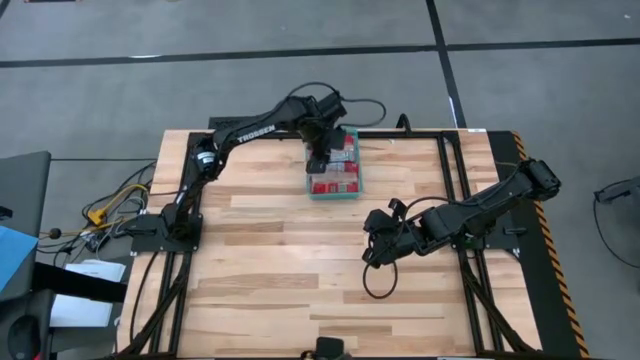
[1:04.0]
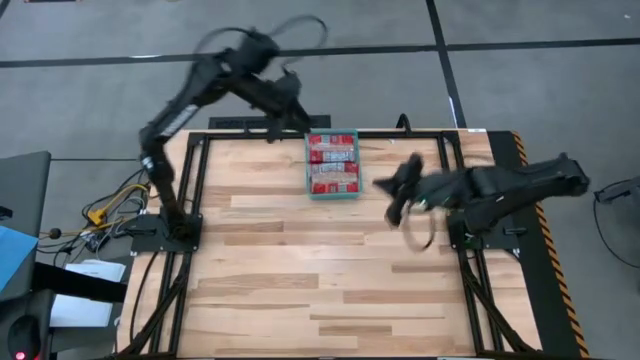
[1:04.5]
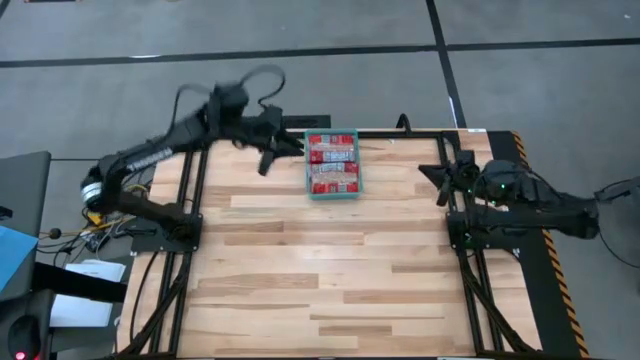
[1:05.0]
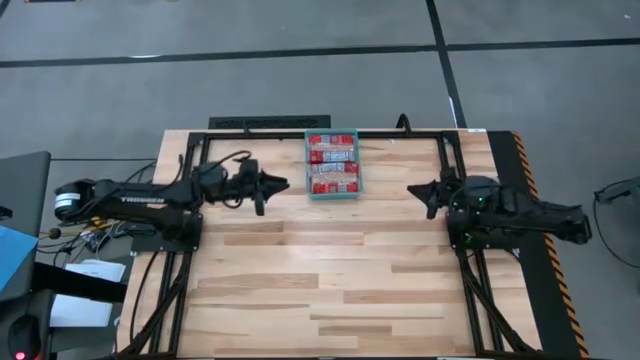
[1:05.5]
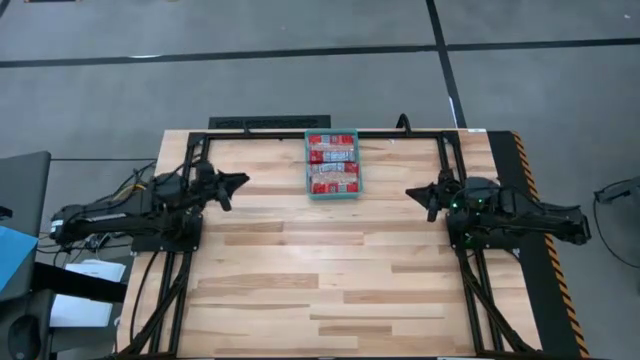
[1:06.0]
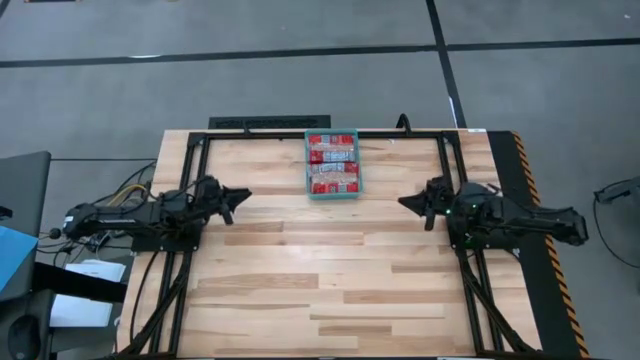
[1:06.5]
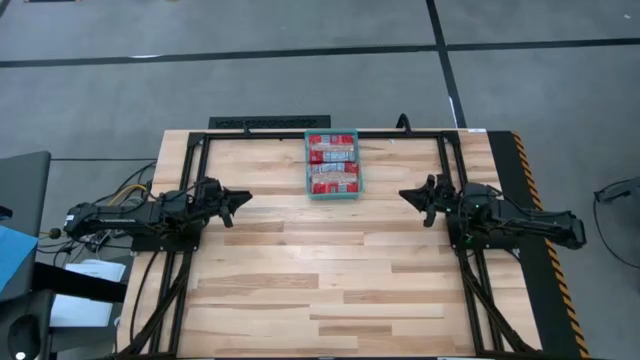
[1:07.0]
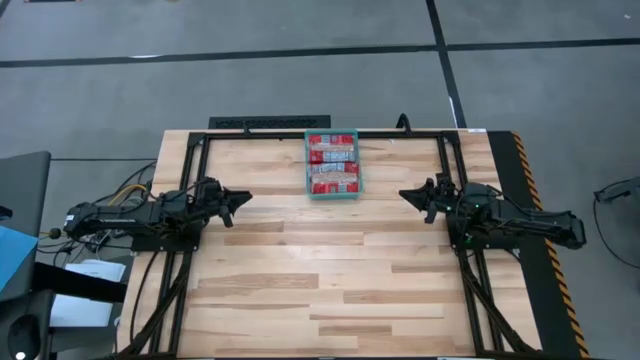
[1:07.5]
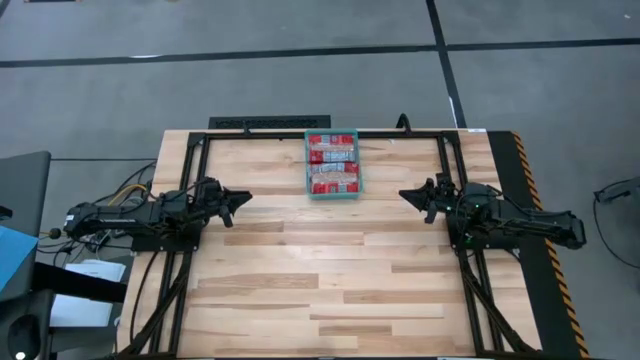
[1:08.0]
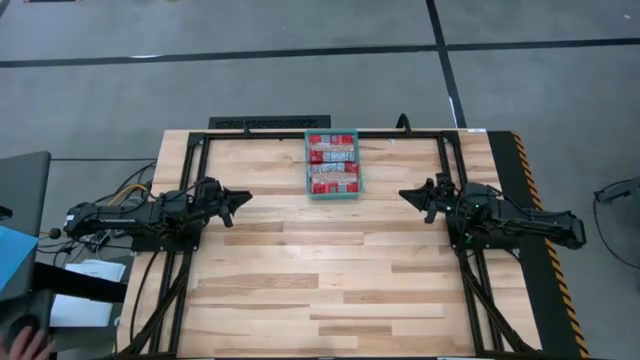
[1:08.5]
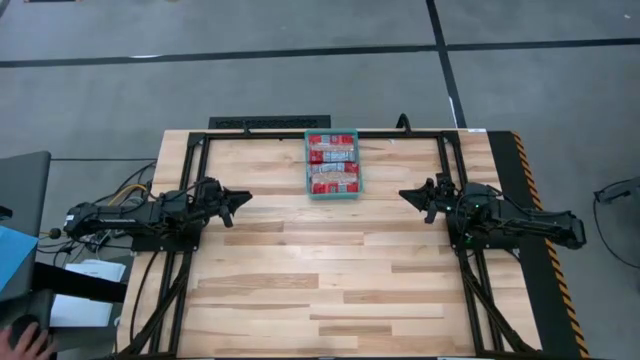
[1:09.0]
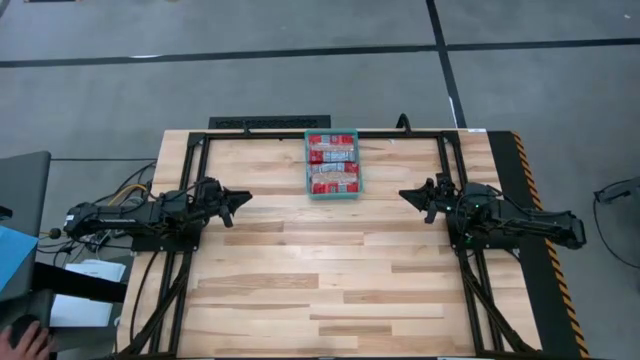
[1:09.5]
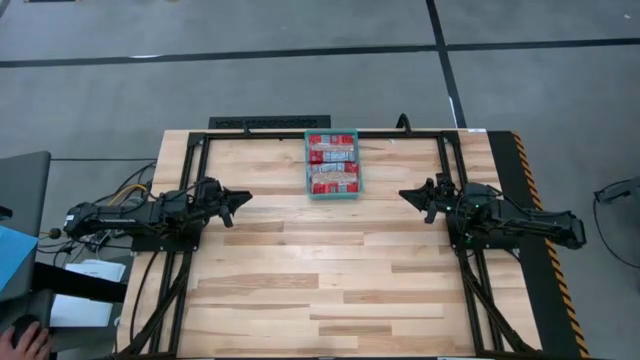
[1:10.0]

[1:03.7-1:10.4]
Task: Sort popcorn bags into baskets
Return to Home Position

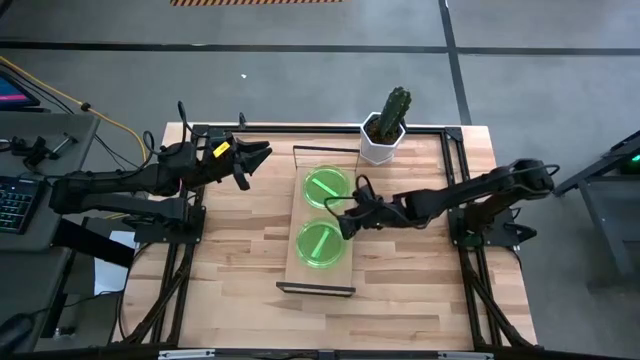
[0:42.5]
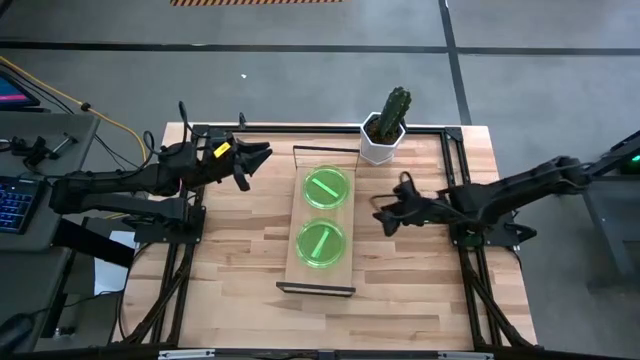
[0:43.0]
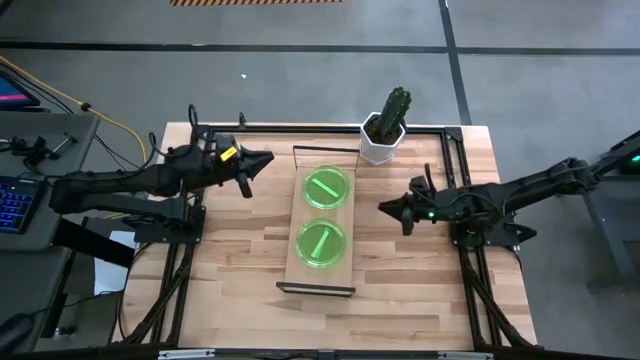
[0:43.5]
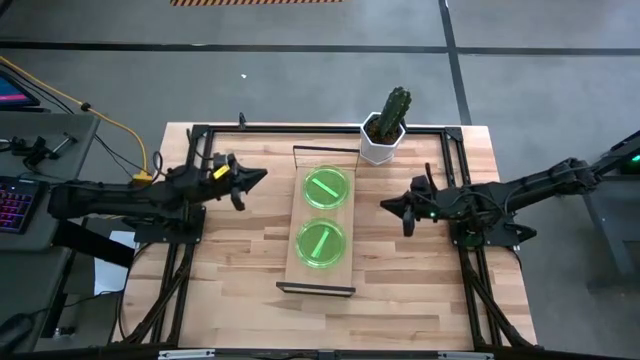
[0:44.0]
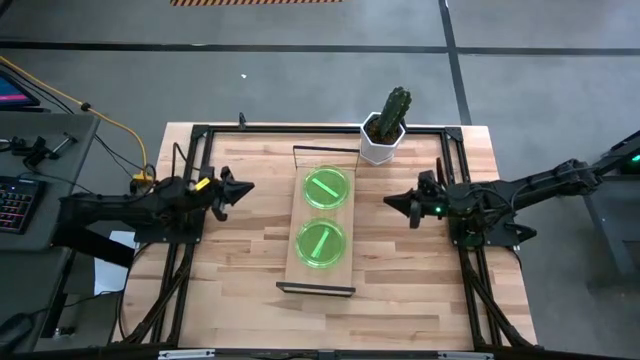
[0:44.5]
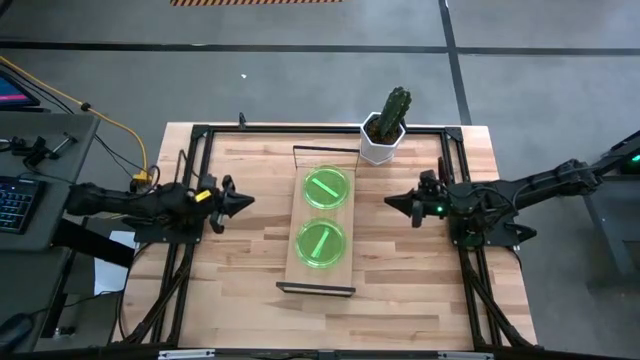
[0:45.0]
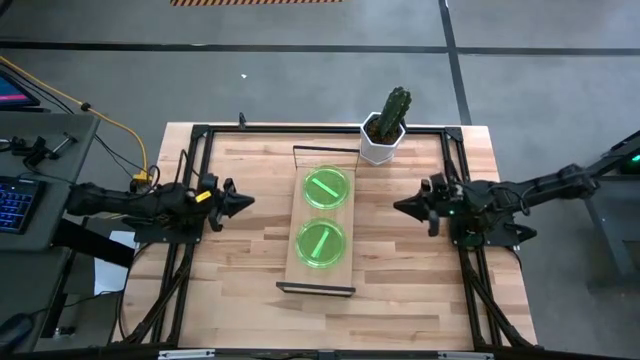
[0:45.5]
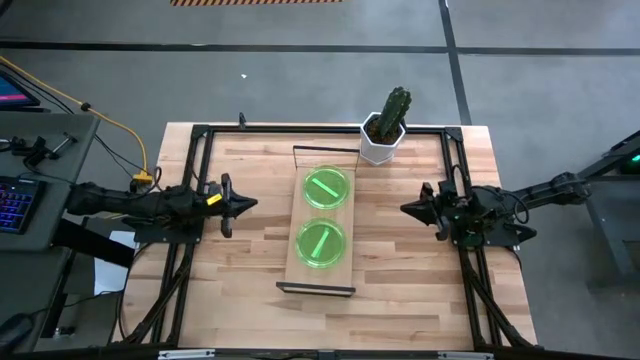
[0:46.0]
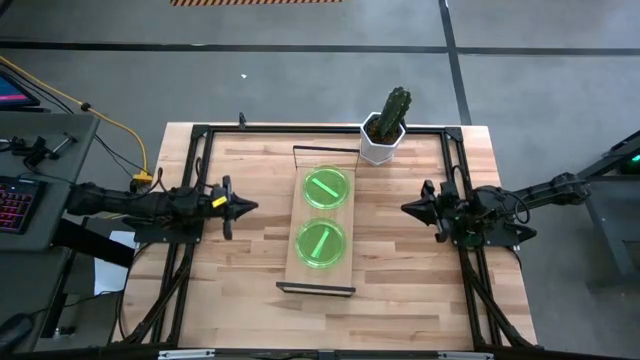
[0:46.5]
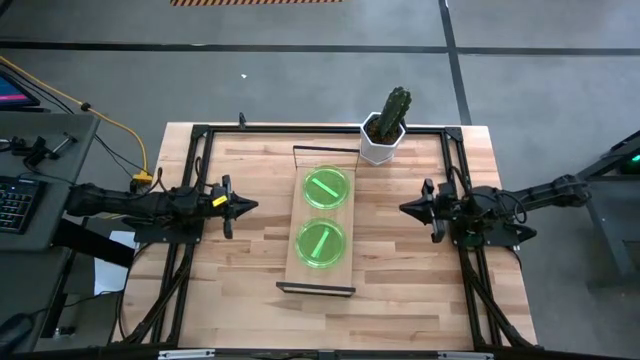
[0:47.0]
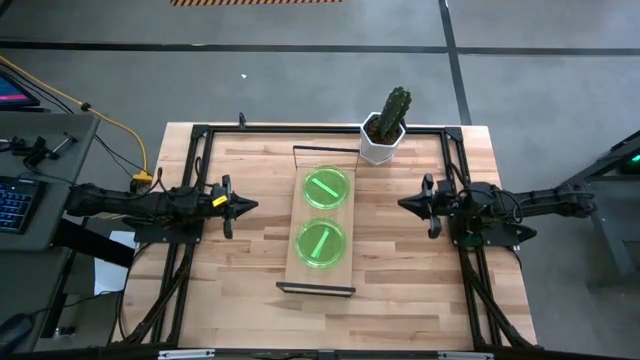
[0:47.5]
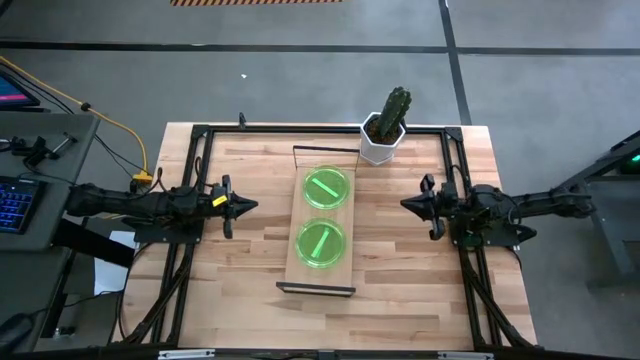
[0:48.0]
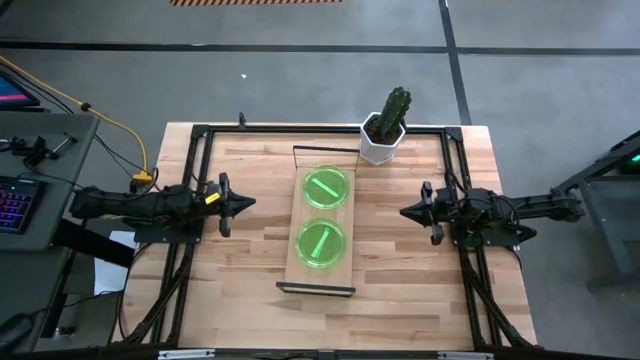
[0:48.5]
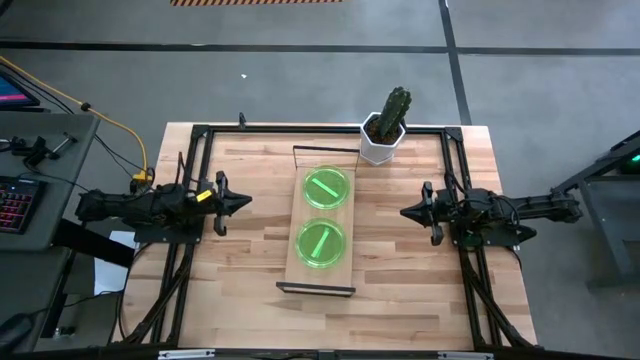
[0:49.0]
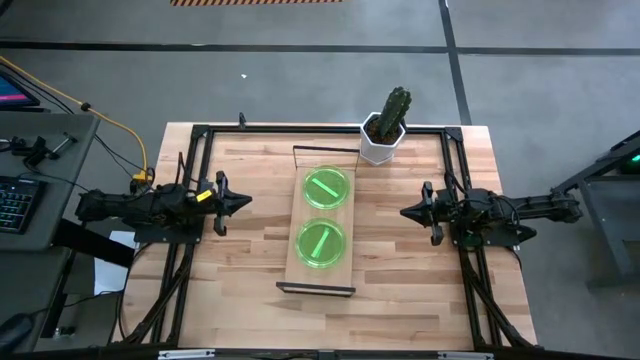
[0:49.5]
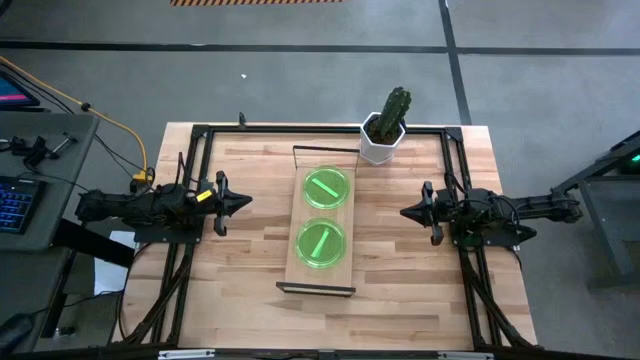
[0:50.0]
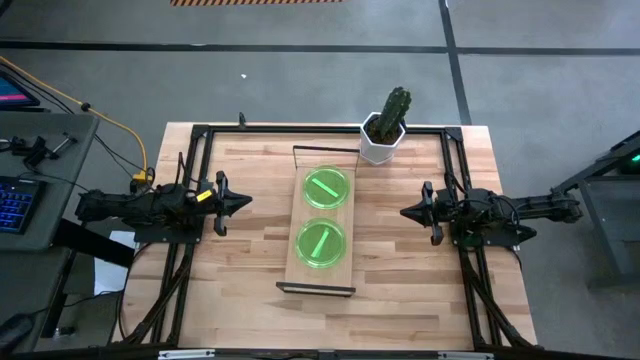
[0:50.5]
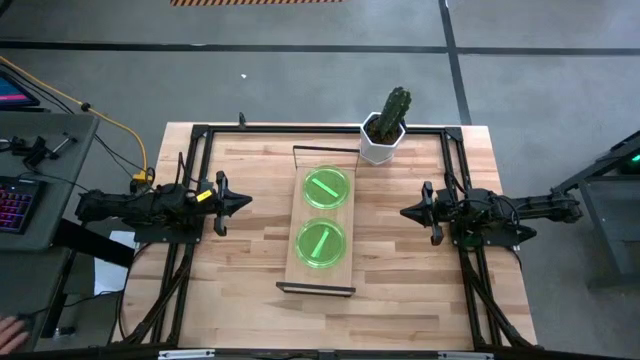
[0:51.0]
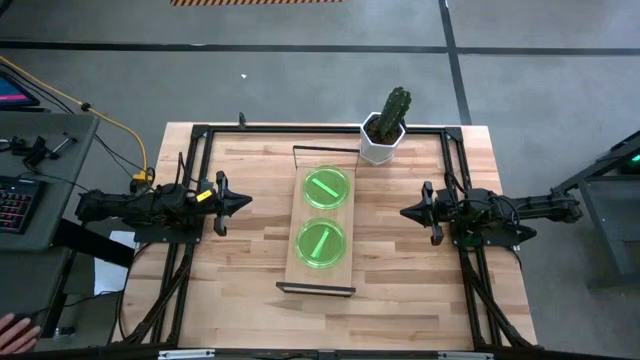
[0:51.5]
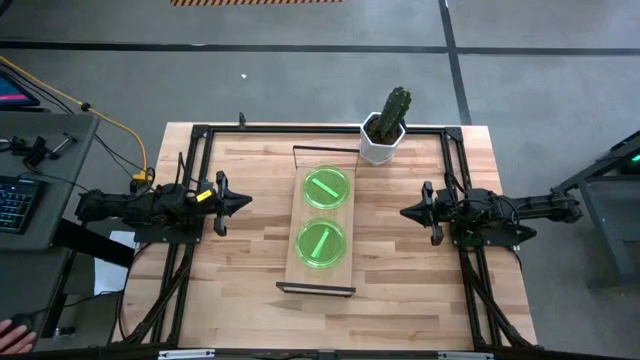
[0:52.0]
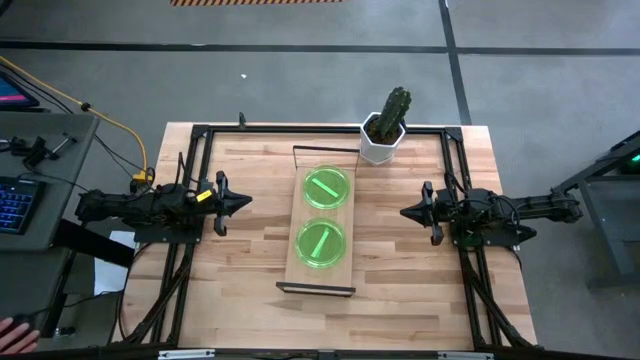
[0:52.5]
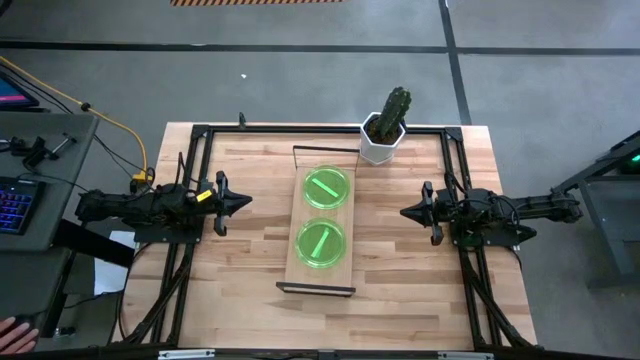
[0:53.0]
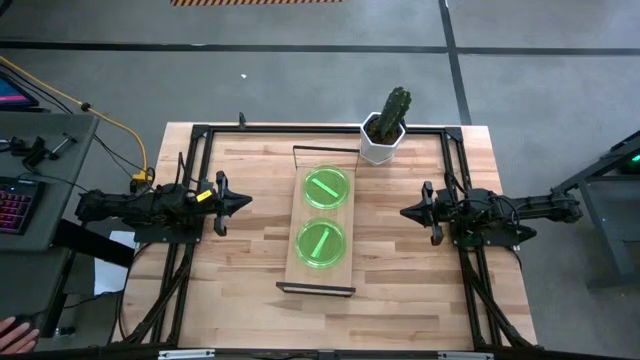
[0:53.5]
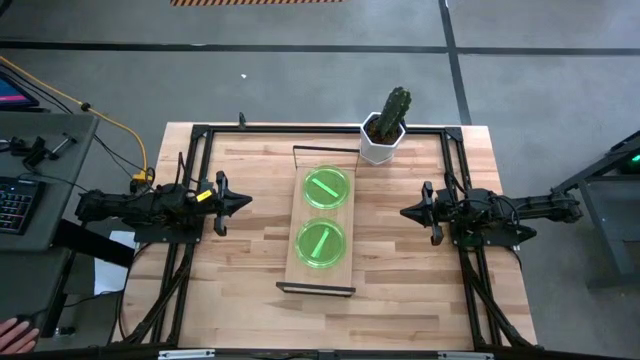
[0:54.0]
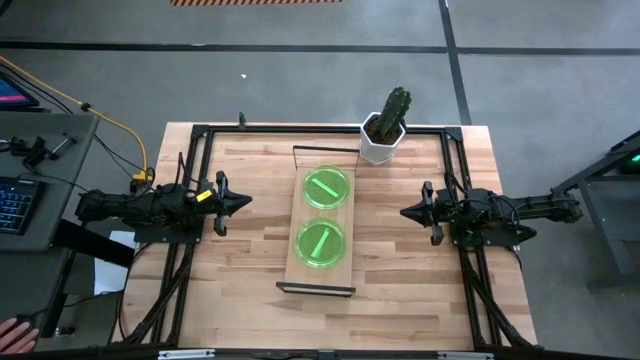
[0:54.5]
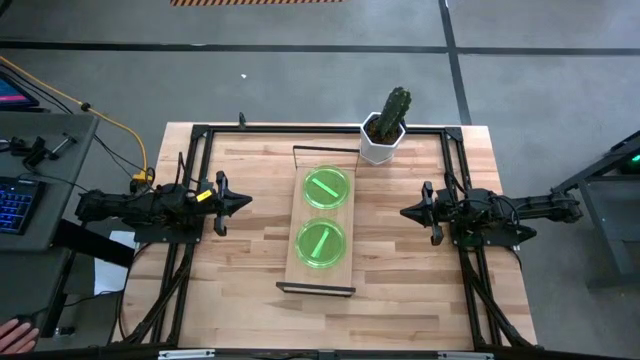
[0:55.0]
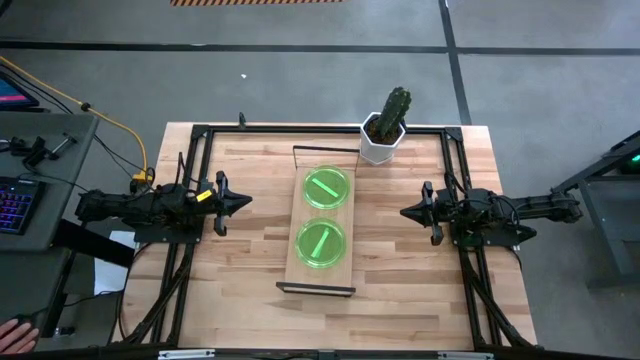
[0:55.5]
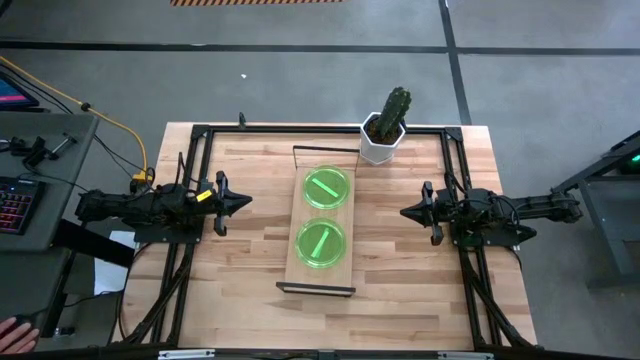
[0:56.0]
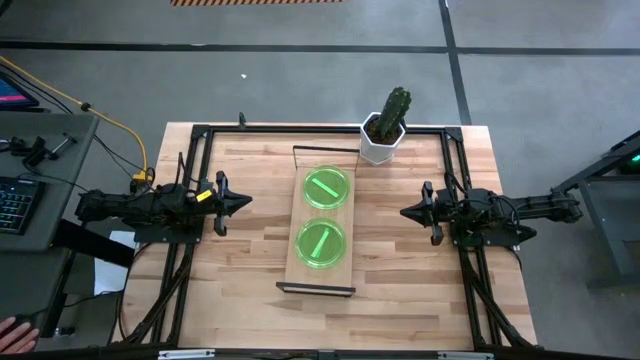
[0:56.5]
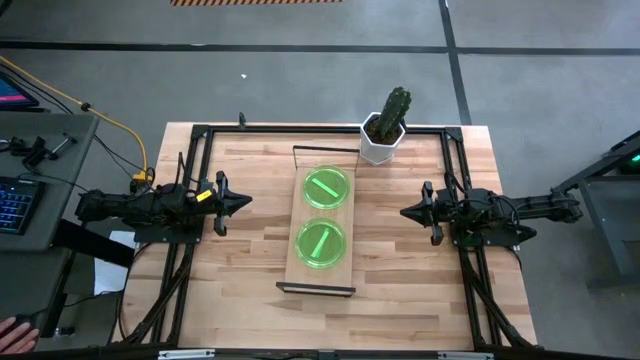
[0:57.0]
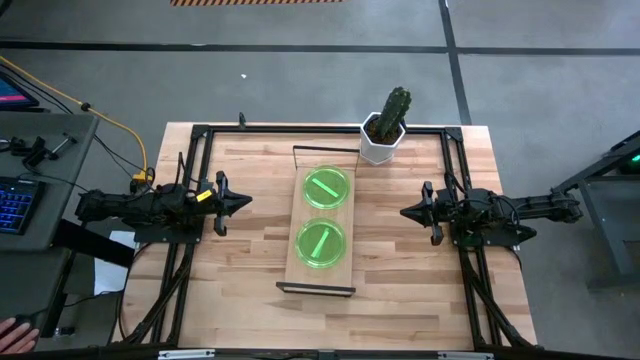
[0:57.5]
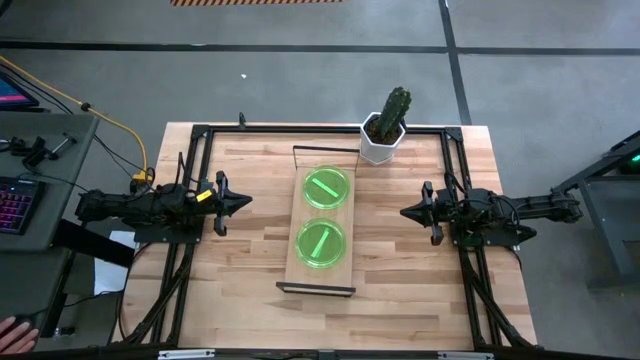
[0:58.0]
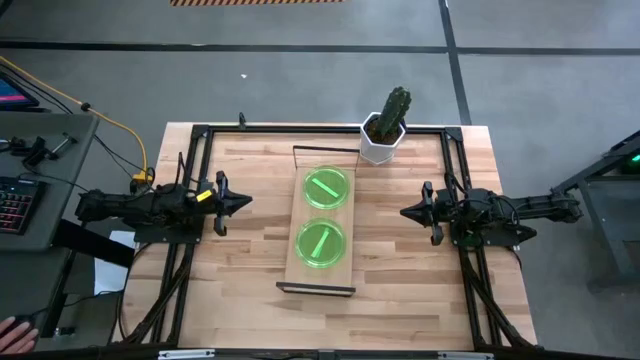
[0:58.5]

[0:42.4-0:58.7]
Task: Place and stack plates onto a shelf
Return to Home Position
